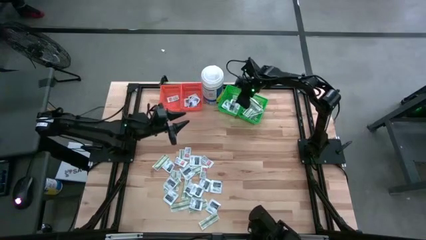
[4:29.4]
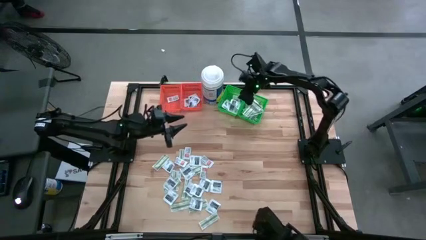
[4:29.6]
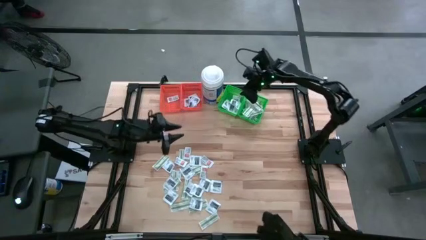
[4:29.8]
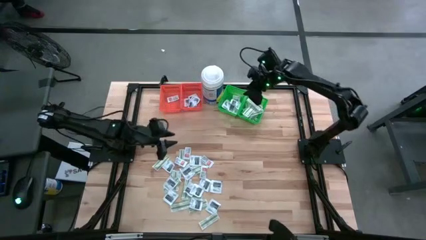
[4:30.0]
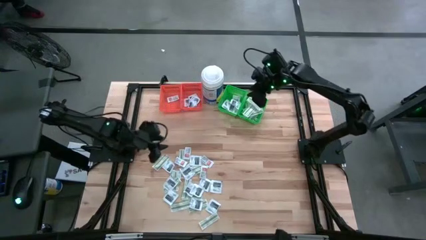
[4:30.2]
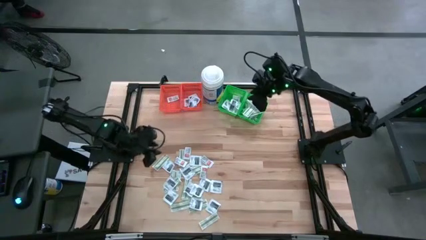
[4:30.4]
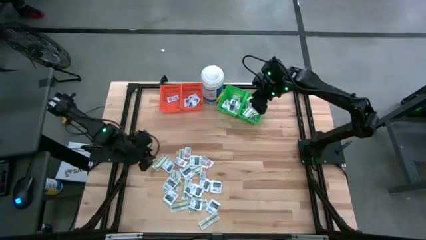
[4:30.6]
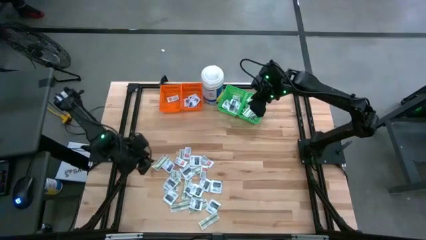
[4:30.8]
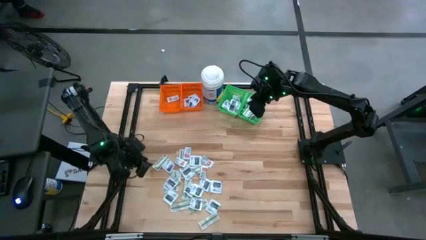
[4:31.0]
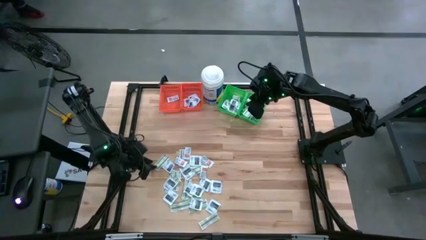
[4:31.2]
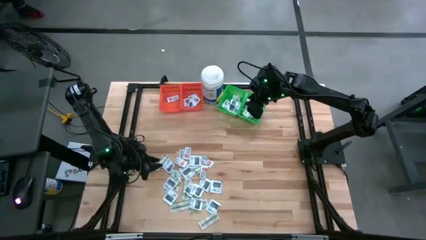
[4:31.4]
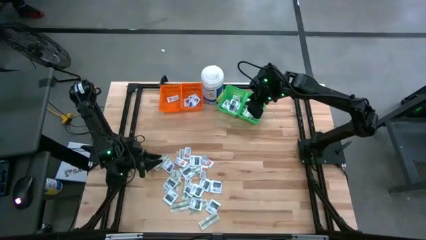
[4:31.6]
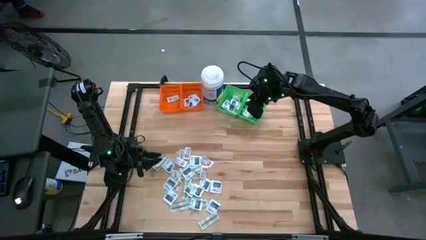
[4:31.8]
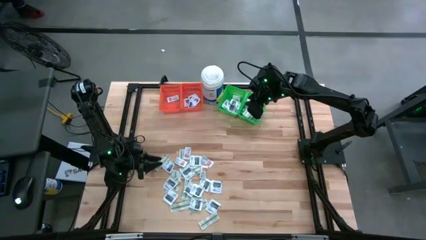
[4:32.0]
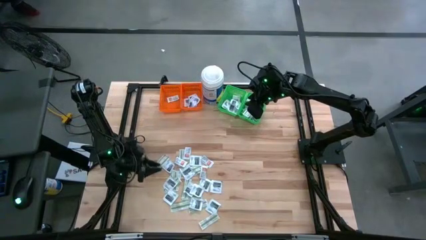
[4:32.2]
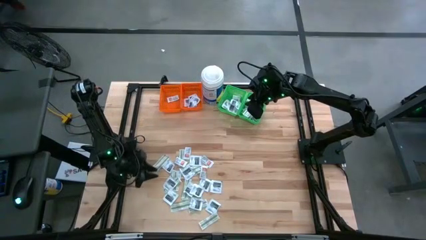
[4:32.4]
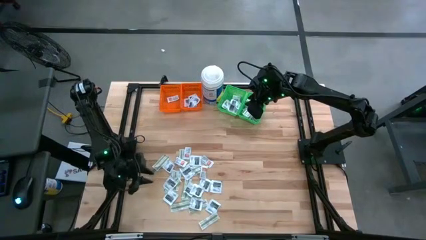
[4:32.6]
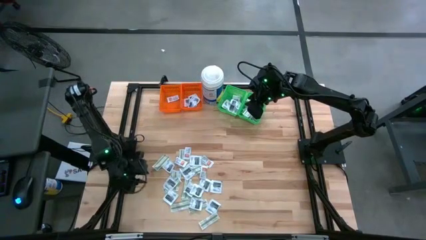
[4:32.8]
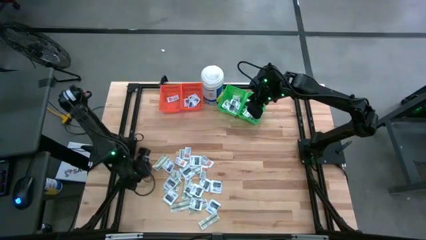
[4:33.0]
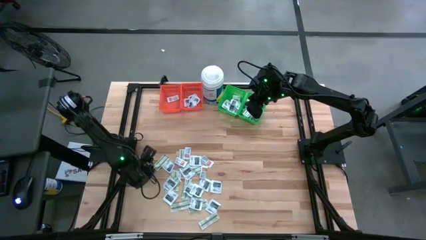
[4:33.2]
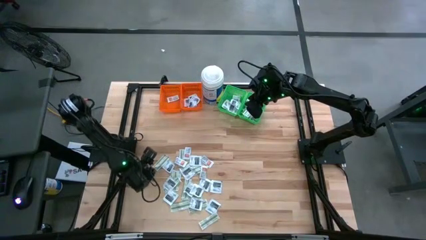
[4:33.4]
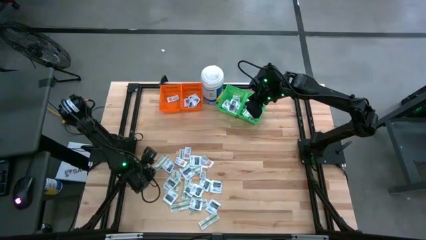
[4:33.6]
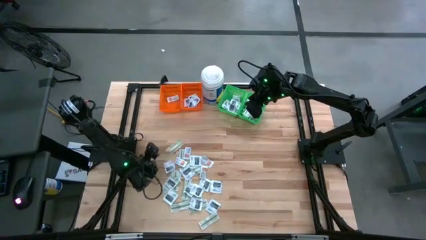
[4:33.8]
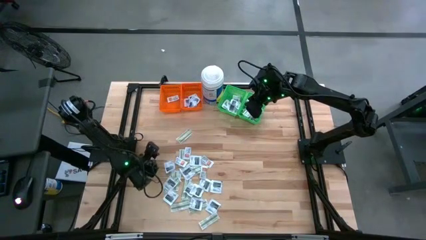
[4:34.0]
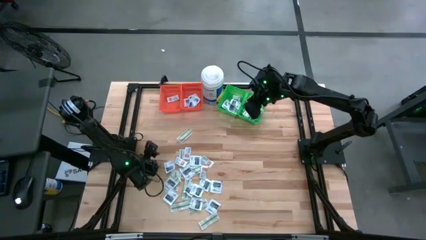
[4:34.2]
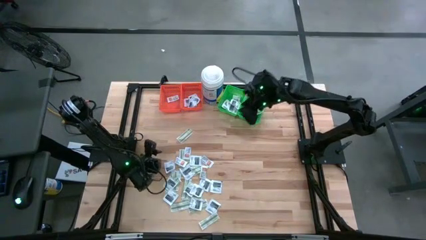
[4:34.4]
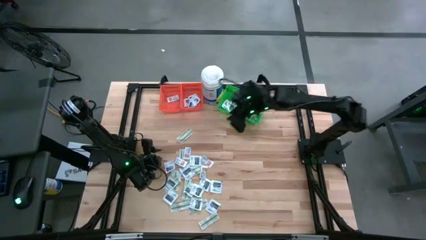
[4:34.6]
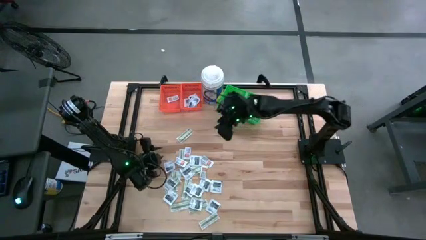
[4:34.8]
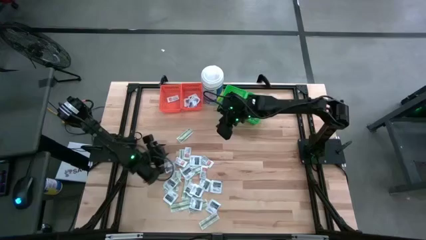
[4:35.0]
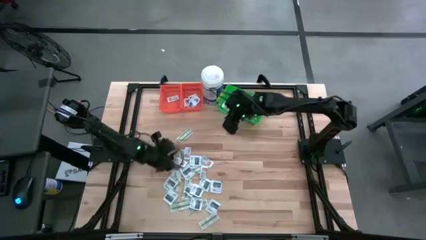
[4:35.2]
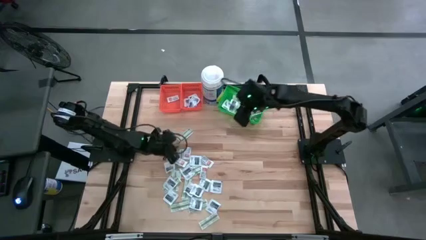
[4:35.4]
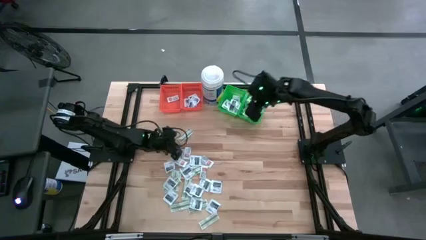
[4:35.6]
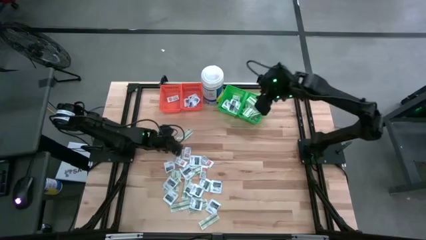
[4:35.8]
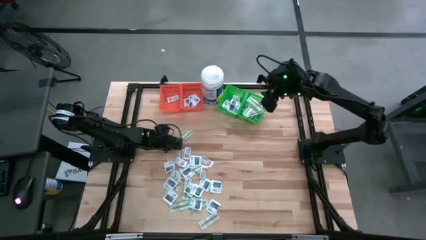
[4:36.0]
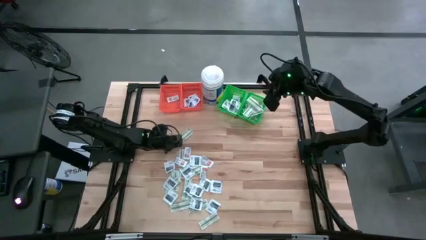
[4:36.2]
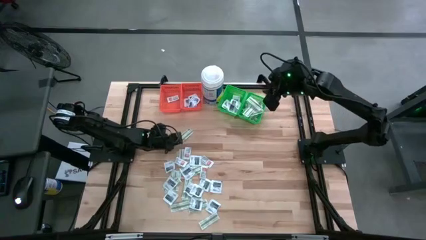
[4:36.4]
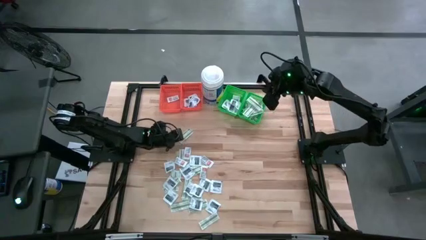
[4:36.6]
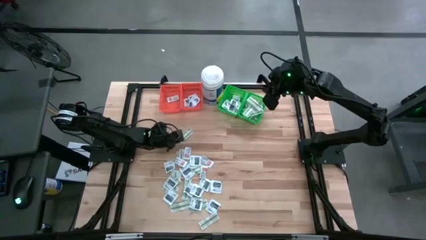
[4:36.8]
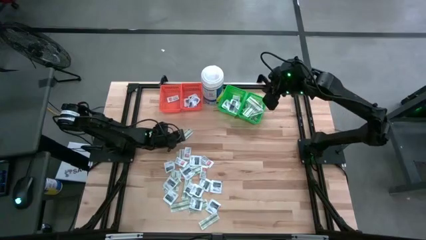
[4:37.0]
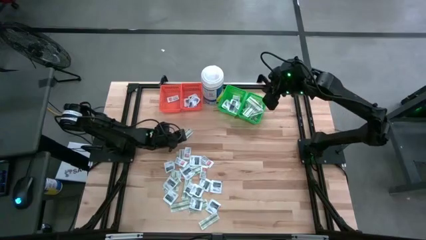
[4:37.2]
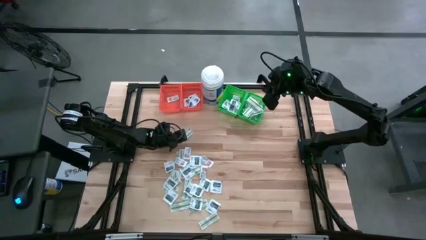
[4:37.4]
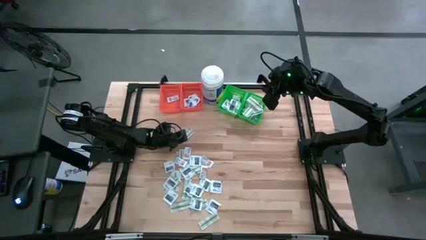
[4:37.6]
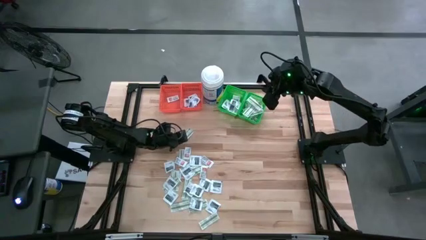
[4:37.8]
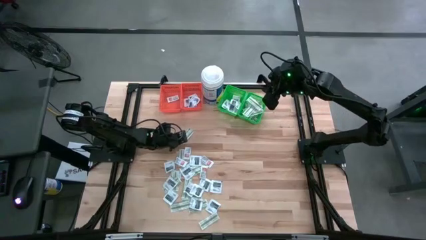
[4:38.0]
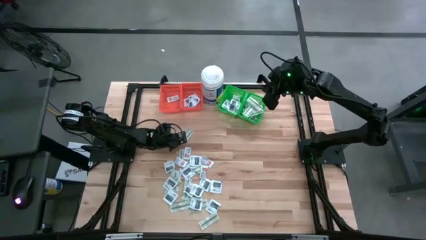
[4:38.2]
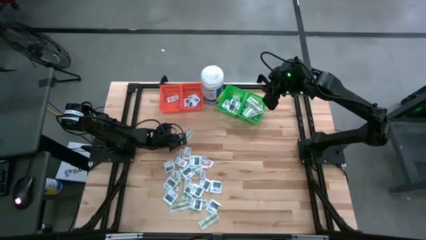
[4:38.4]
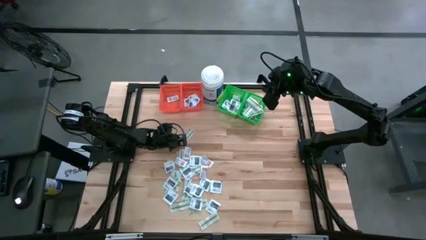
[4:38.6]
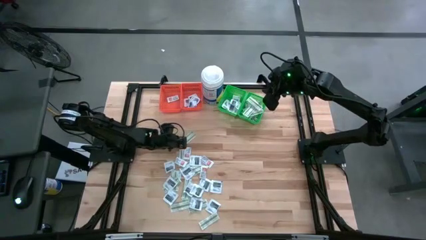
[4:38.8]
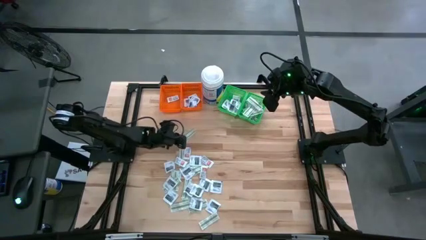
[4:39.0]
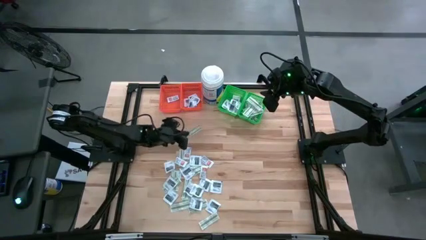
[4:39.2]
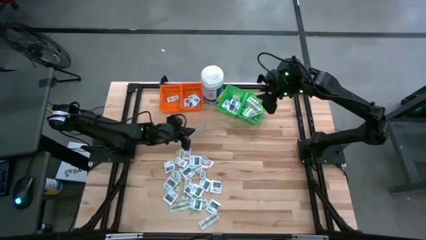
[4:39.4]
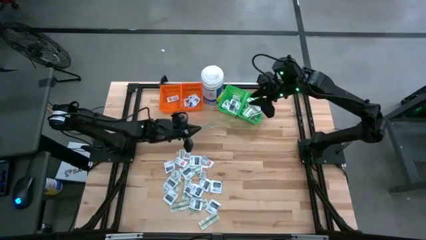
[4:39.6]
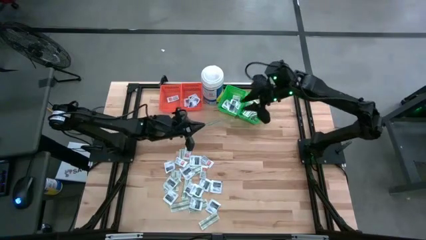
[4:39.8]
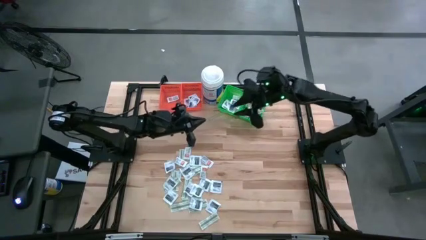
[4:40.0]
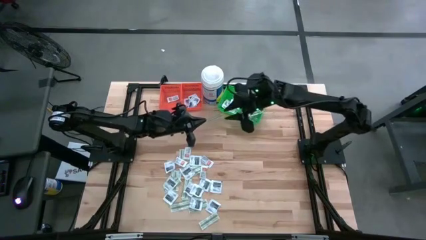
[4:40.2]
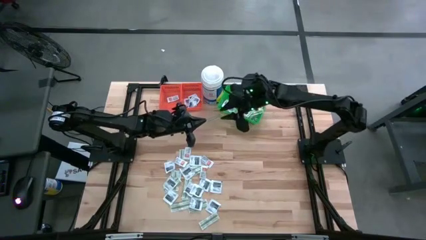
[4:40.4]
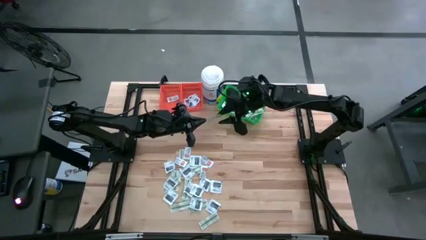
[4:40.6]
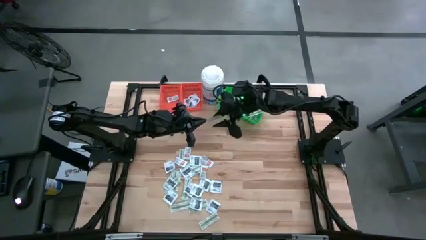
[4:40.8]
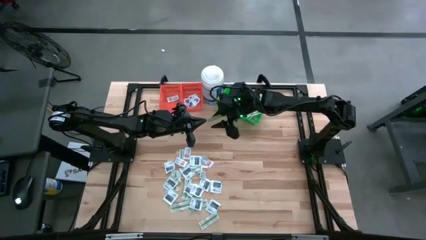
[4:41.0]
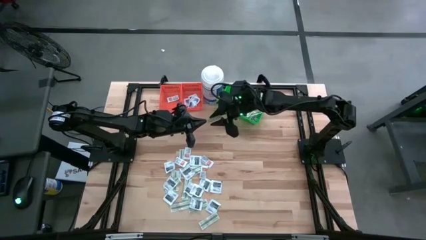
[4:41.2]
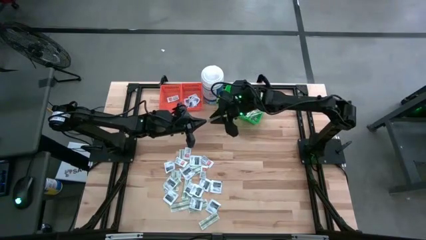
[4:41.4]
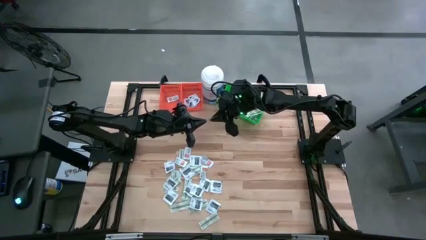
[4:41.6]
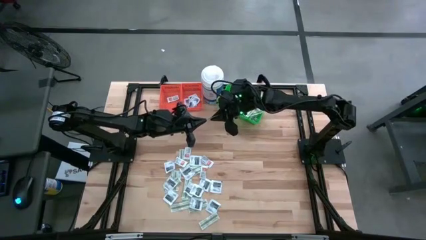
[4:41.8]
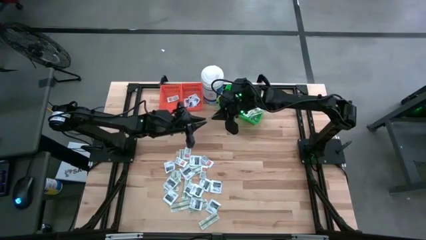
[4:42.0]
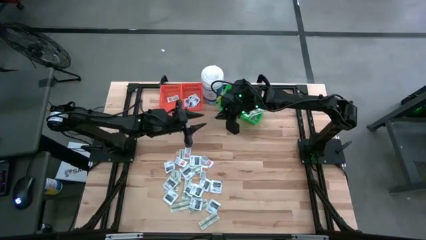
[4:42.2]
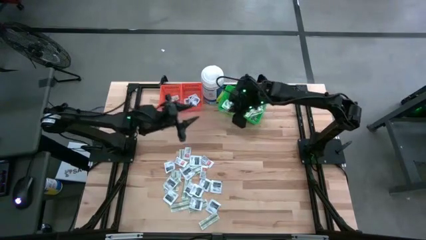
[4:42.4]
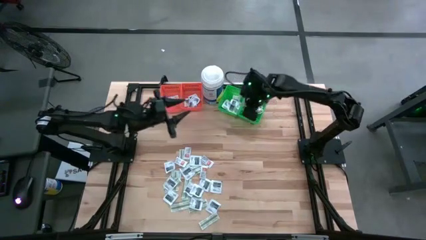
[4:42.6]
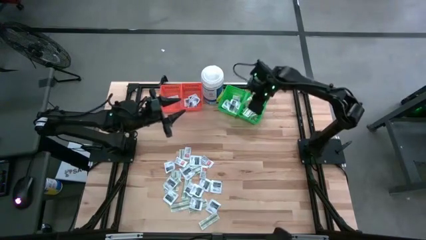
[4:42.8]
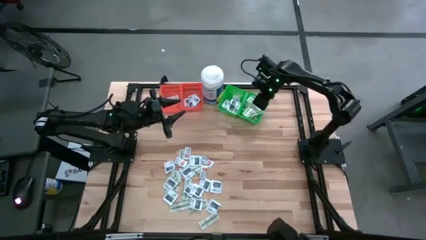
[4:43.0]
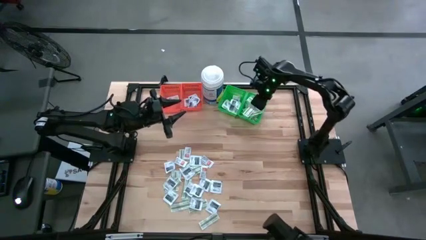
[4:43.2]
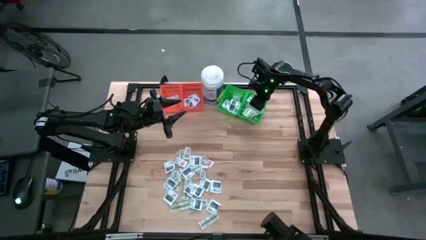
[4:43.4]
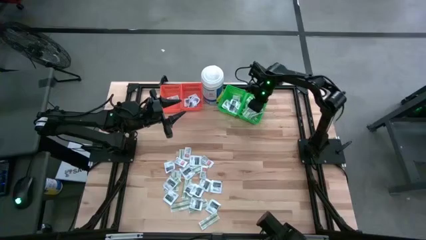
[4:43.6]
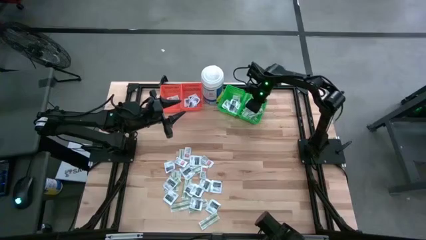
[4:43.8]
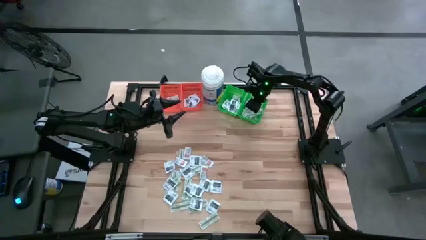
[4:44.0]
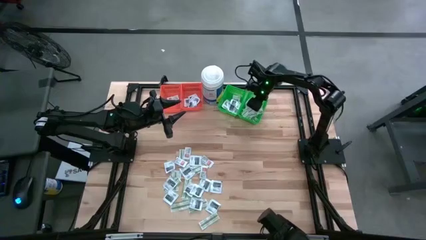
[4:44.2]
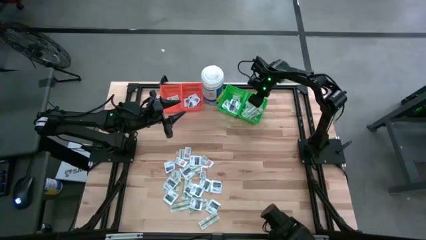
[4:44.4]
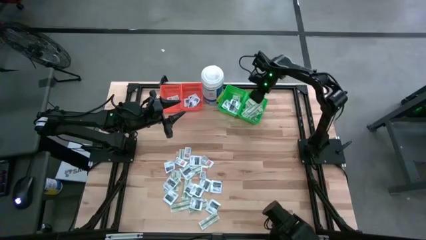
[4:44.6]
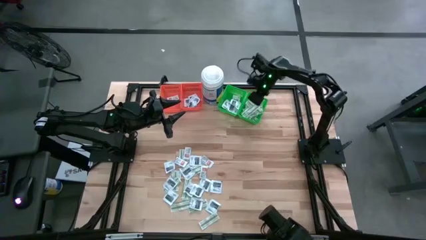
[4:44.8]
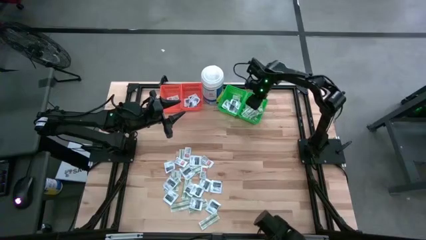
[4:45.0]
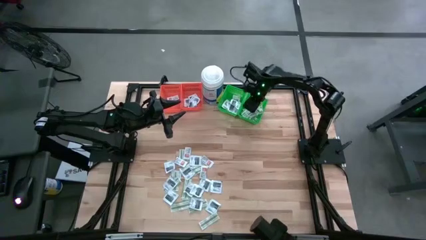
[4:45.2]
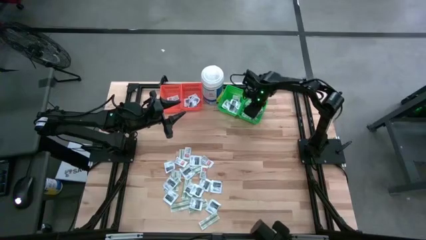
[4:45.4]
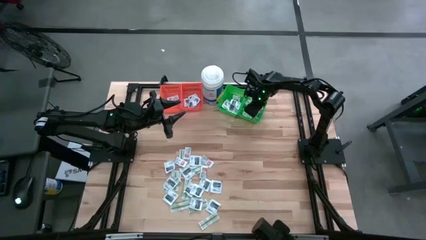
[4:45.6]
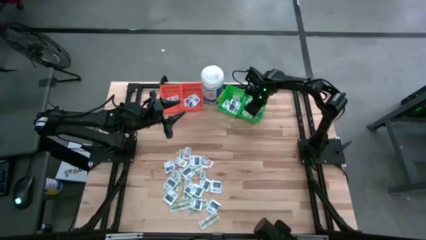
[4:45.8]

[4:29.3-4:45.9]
Task: Pick & Place First Aid Supplies
Put the green bandage pack into the right green bin
